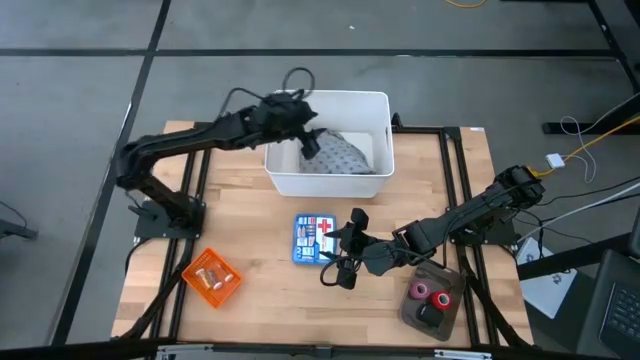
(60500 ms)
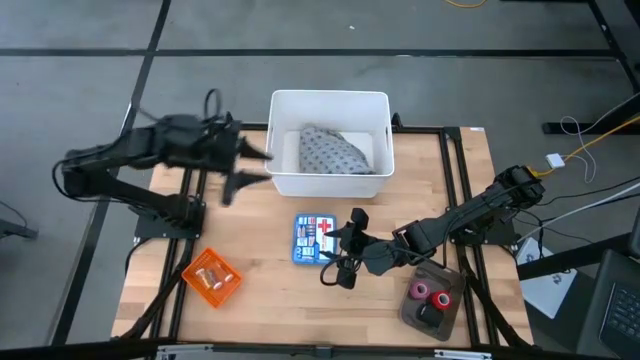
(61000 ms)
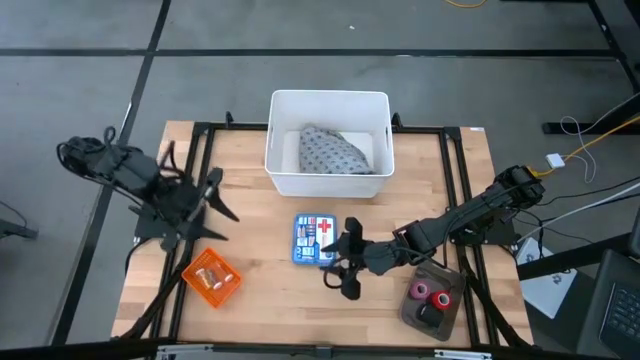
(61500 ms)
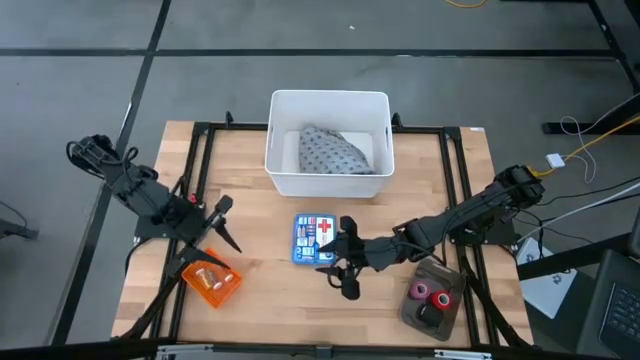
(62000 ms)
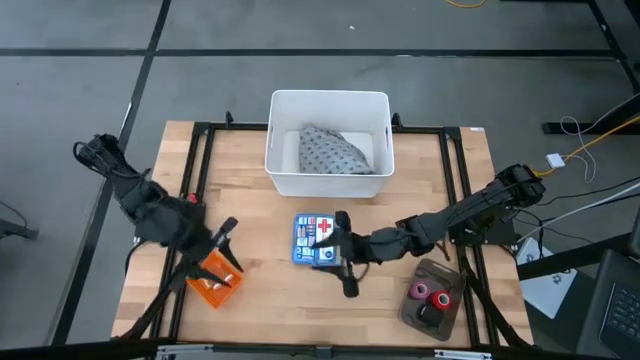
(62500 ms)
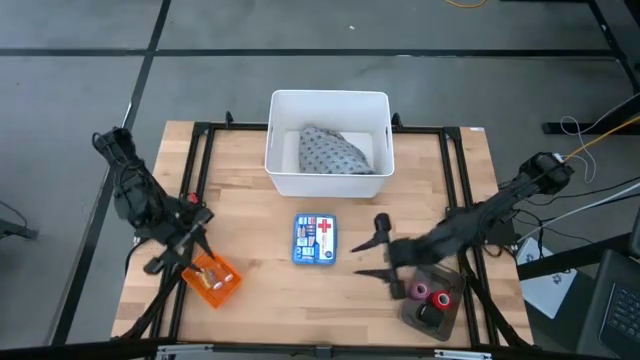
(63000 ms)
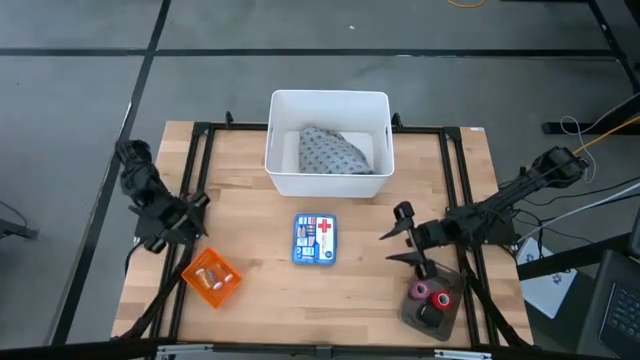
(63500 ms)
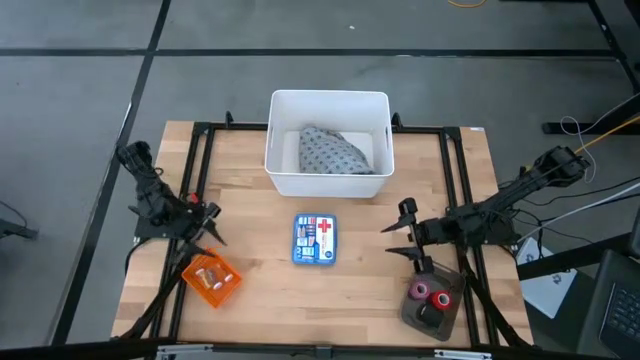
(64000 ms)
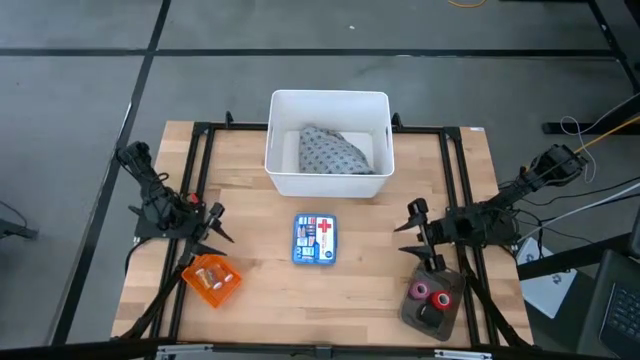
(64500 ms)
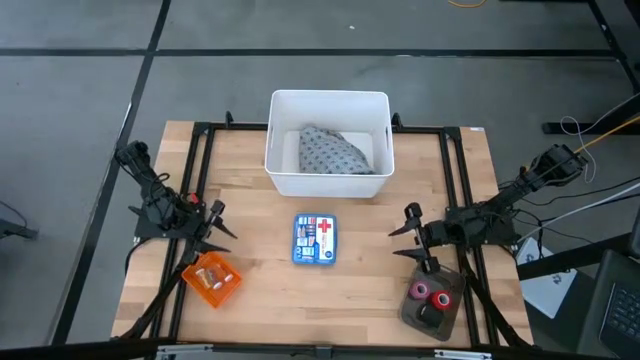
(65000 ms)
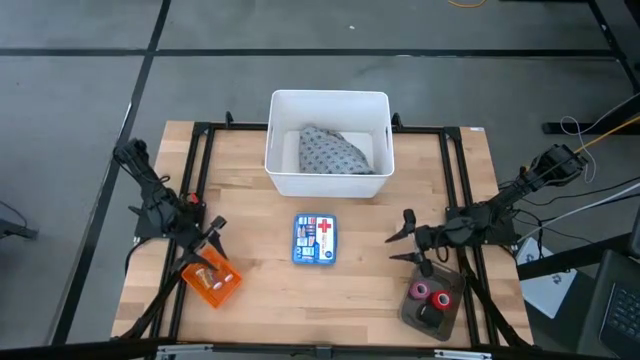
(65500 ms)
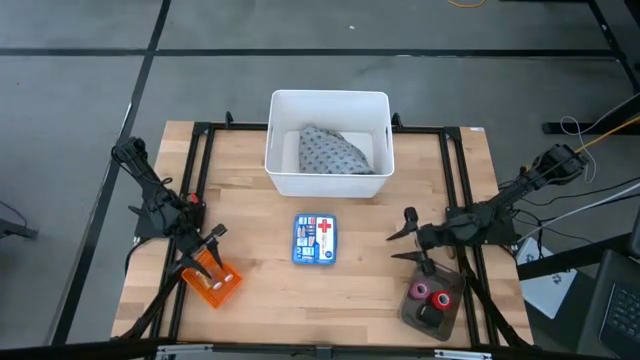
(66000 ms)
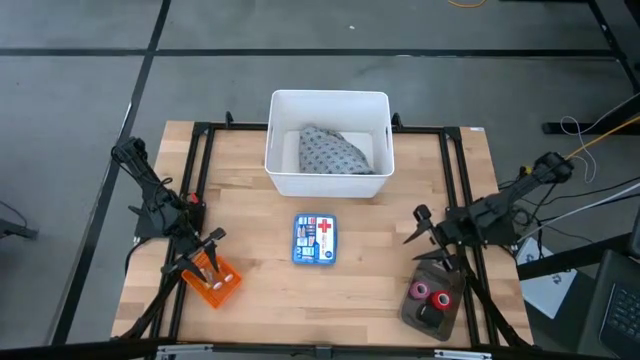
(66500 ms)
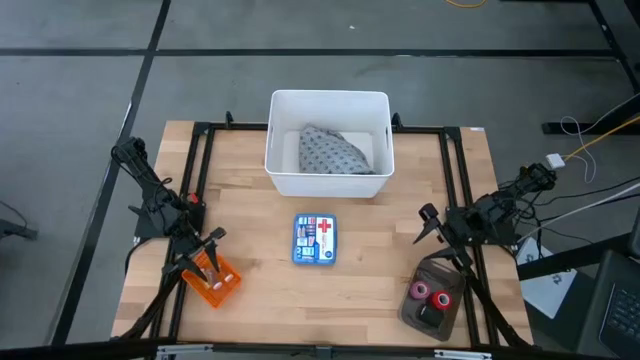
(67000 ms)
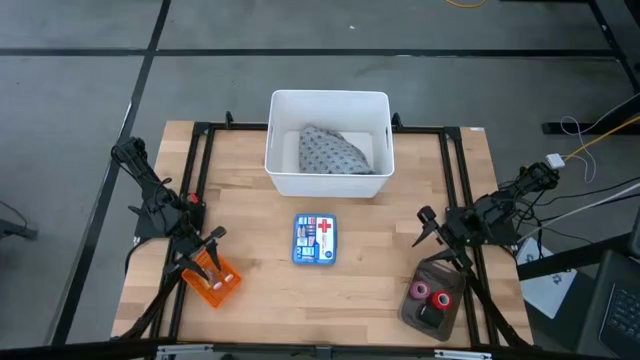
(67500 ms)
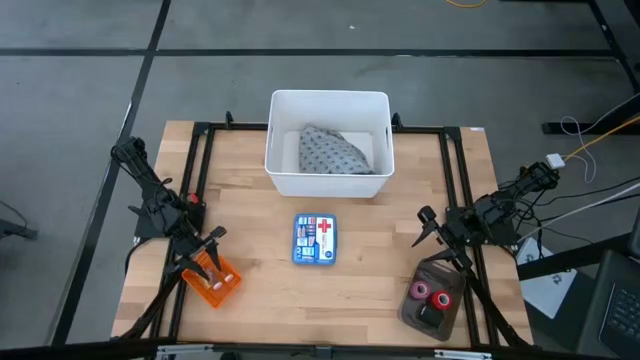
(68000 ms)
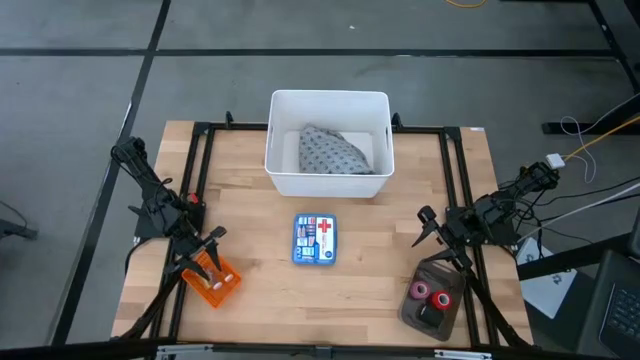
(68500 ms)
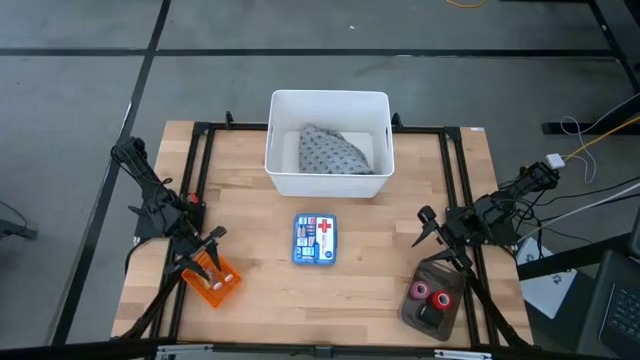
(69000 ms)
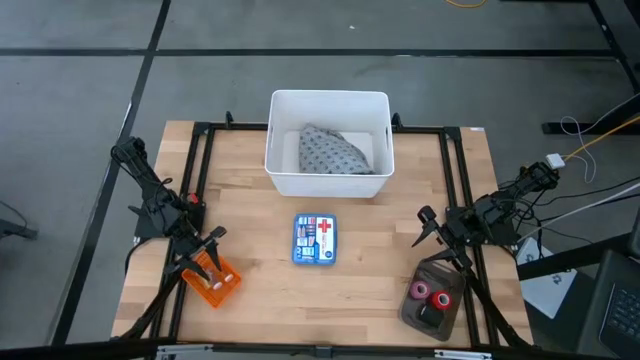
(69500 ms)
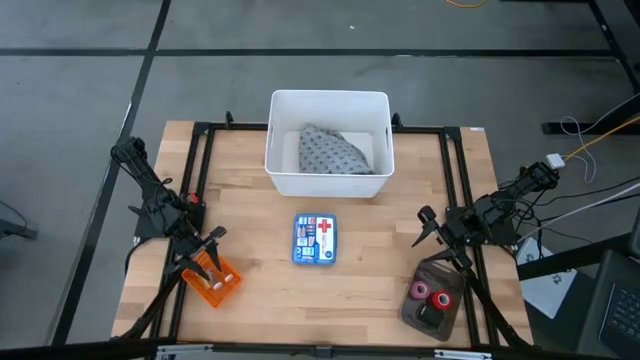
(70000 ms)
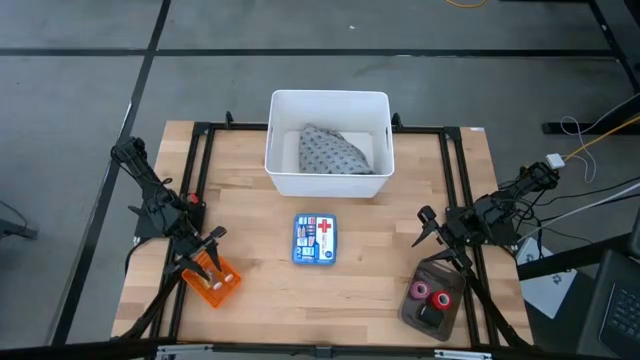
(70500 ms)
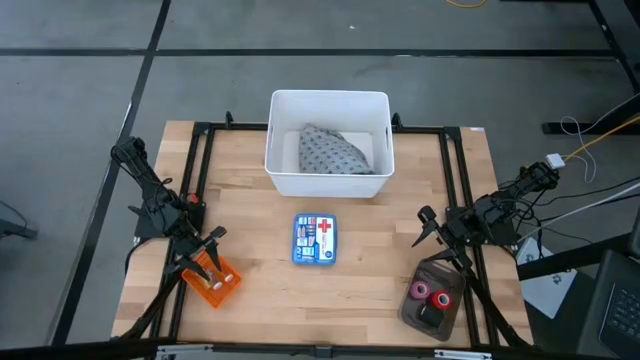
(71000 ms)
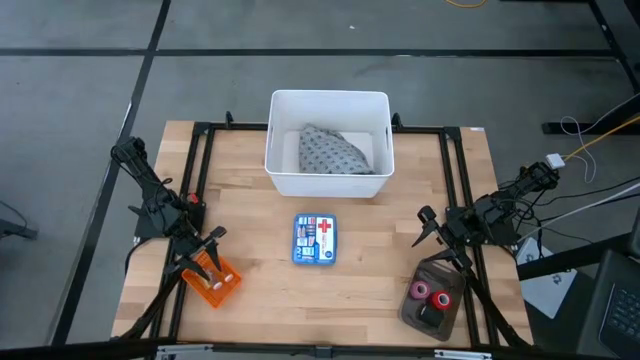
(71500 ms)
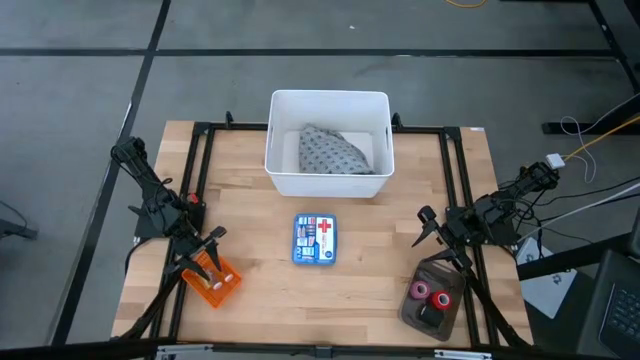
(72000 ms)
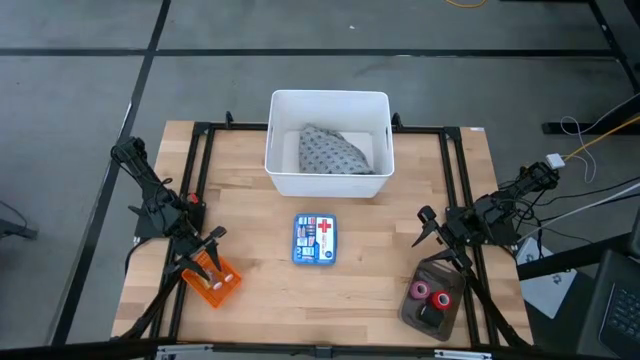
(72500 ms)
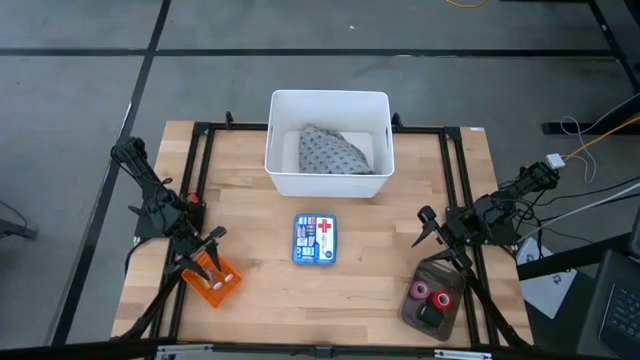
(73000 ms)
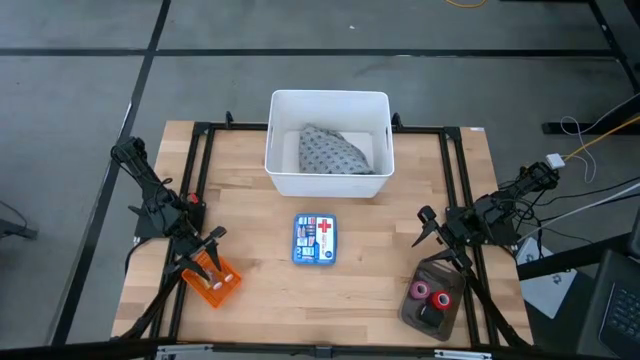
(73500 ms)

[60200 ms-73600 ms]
Task: Pick & place medical supplies in basket/bin
Return to Home Position

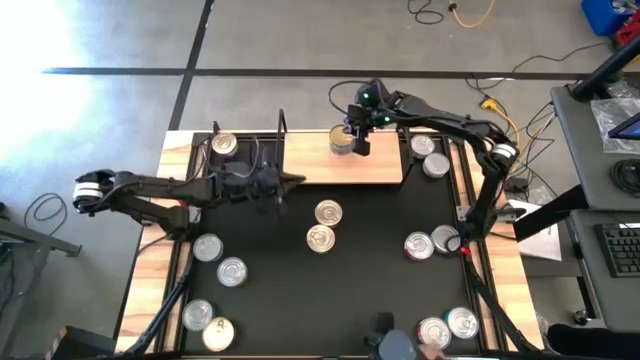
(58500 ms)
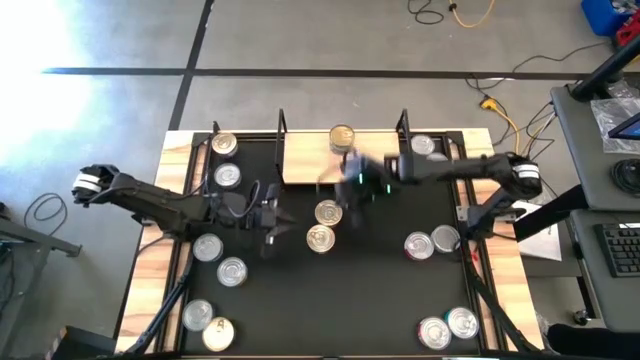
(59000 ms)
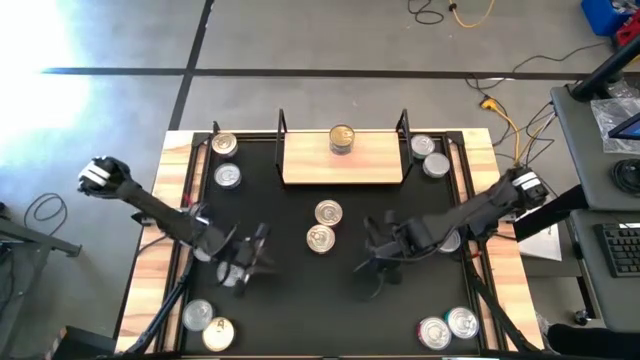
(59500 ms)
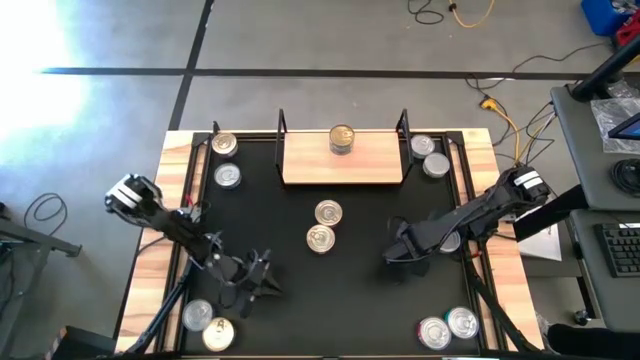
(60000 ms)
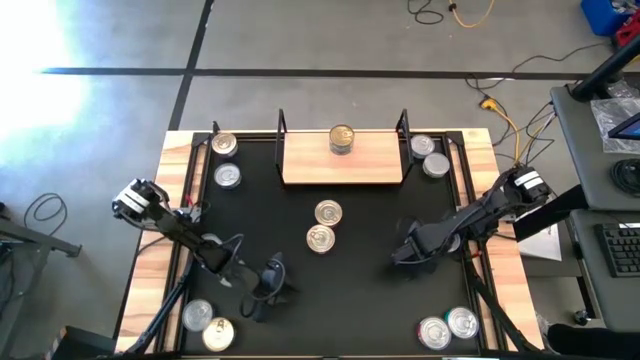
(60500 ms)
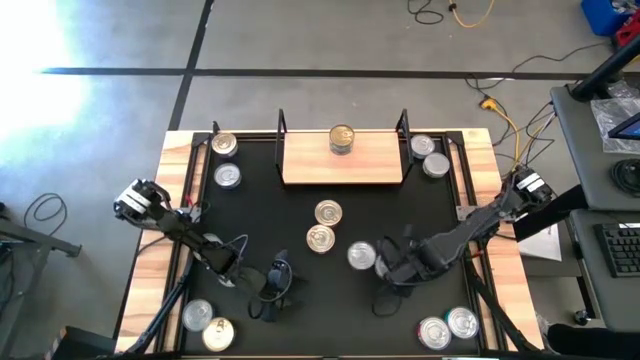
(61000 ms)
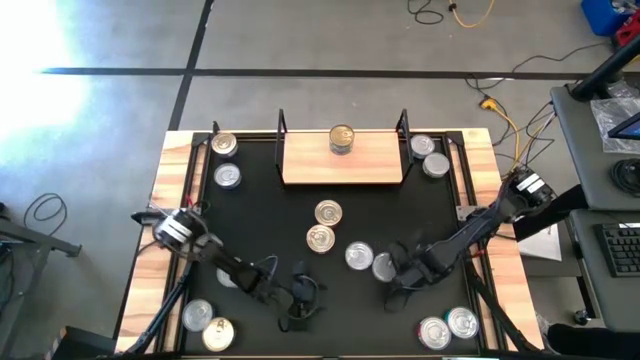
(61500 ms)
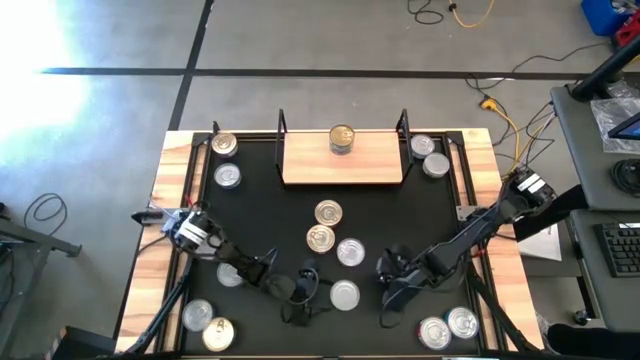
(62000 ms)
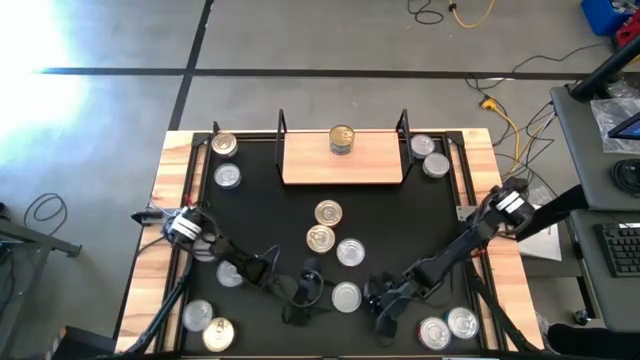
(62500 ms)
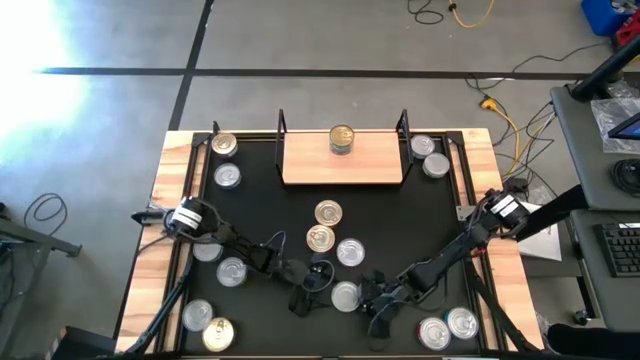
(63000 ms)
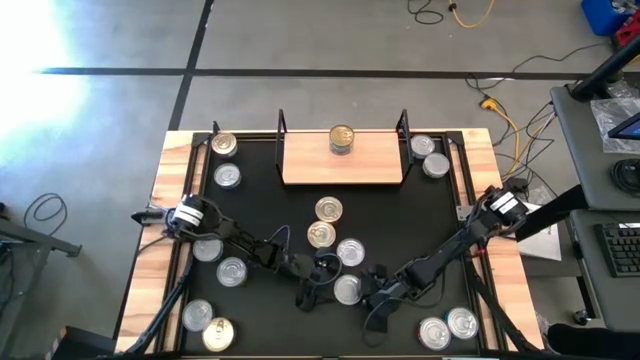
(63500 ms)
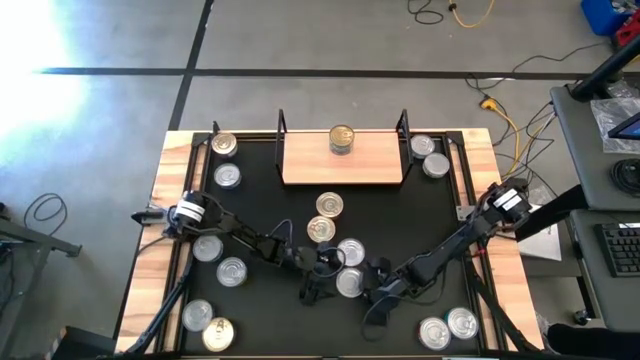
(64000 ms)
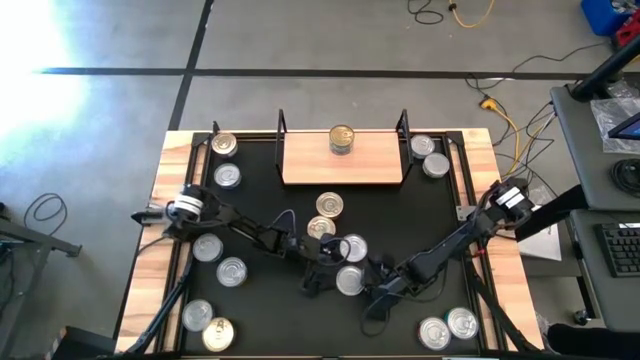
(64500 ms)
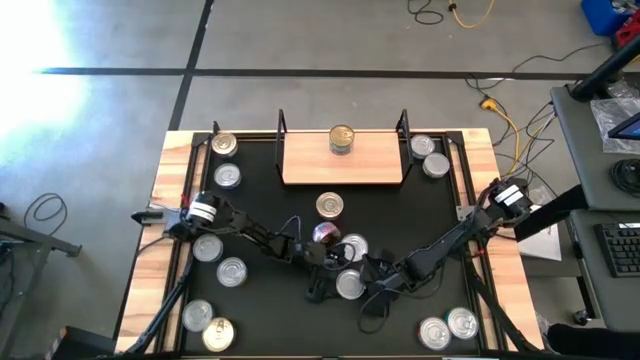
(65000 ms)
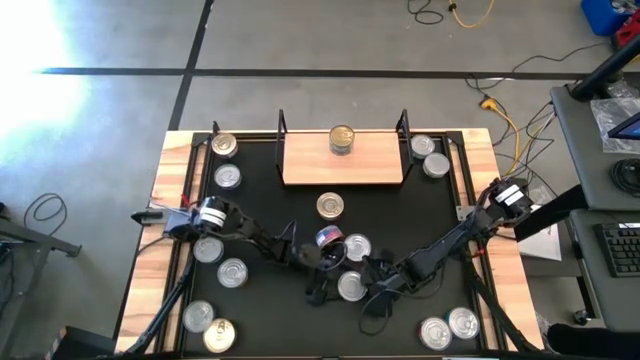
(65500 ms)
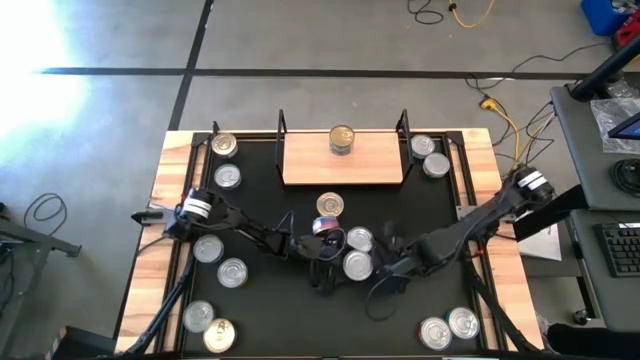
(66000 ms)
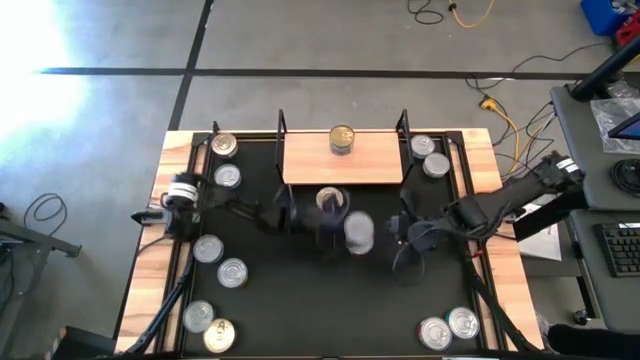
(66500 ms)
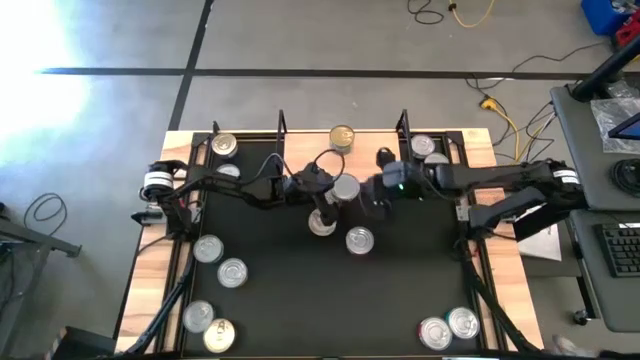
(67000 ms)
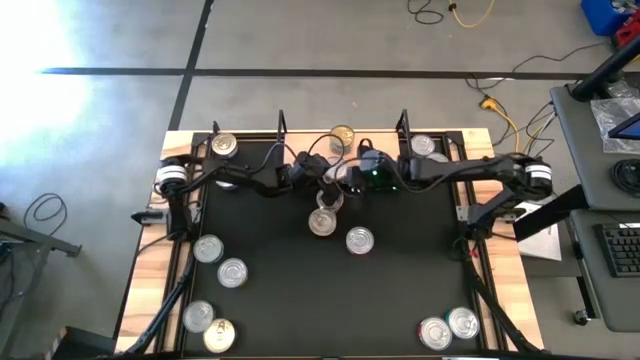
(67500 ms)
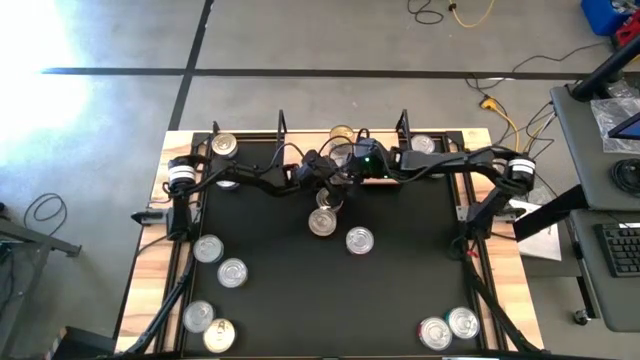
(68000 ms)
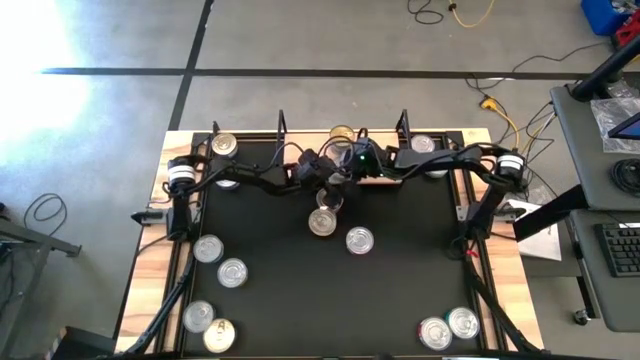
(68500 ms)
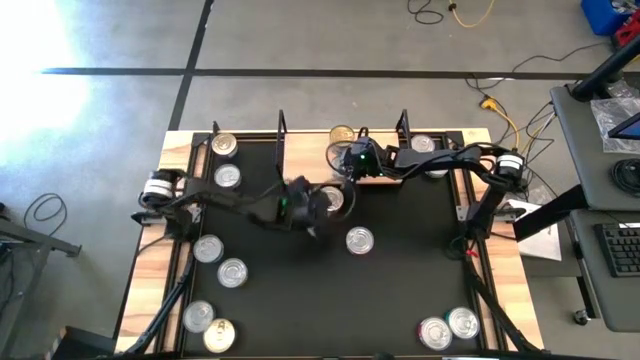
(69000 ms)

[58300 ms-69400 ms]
Task: Stack canned seafood by type on shelf
Put the green tuna can on the shelf
